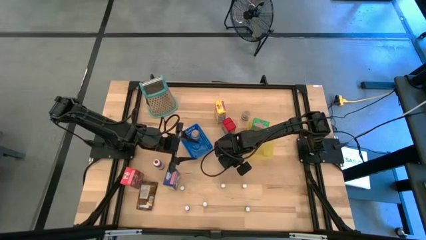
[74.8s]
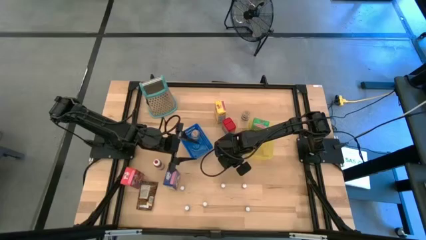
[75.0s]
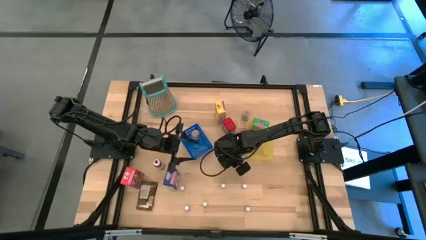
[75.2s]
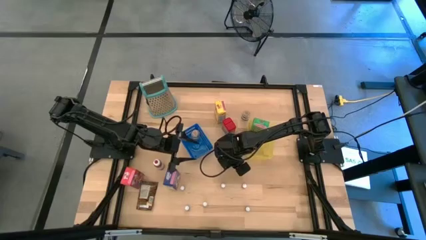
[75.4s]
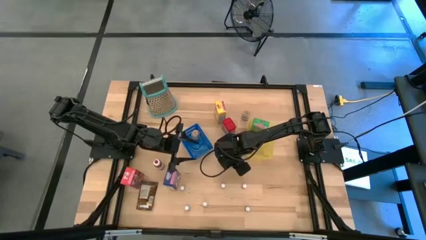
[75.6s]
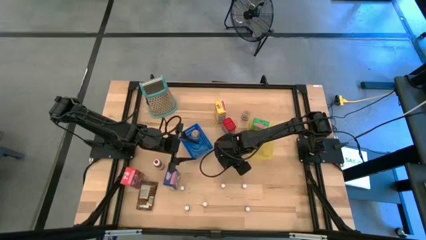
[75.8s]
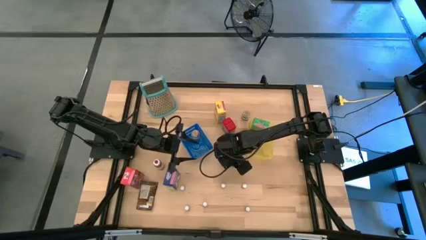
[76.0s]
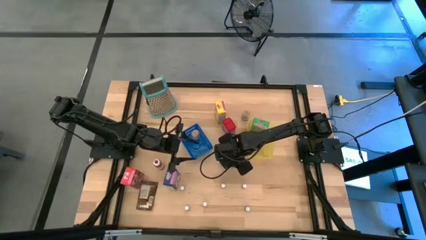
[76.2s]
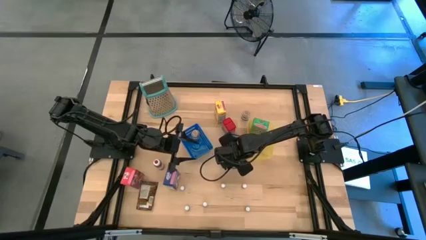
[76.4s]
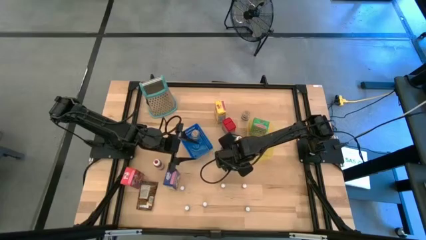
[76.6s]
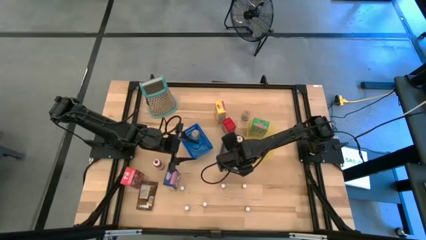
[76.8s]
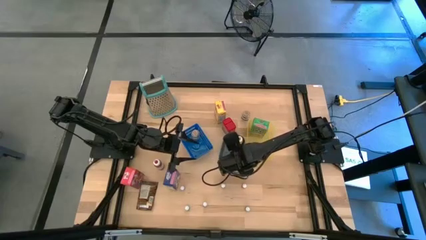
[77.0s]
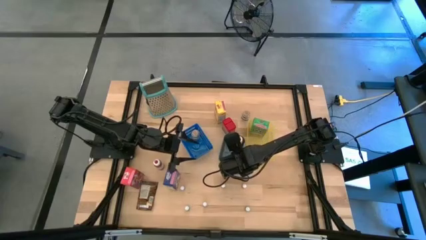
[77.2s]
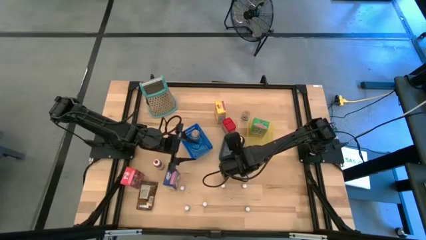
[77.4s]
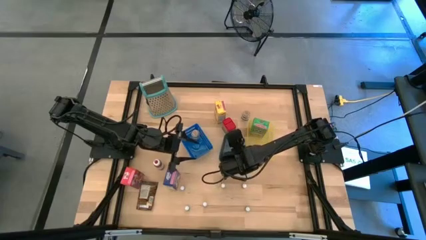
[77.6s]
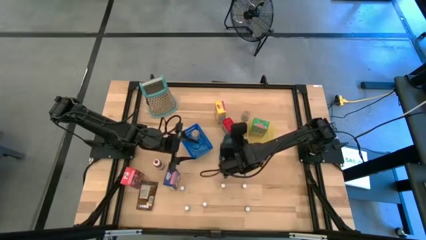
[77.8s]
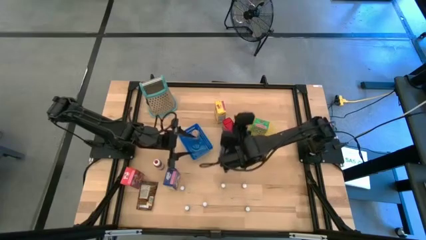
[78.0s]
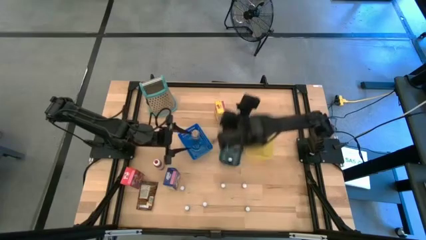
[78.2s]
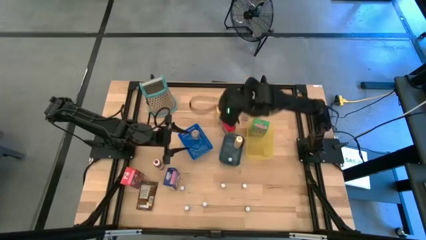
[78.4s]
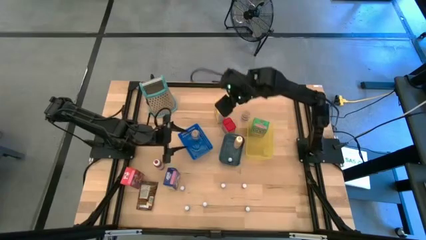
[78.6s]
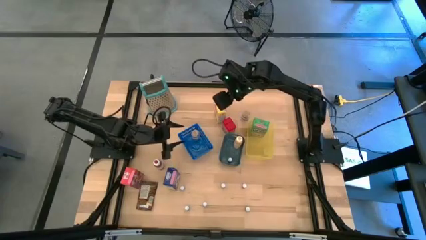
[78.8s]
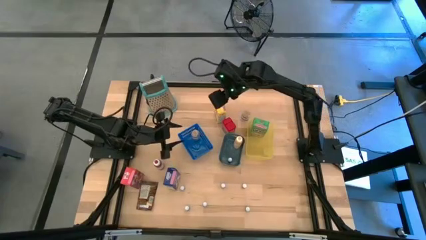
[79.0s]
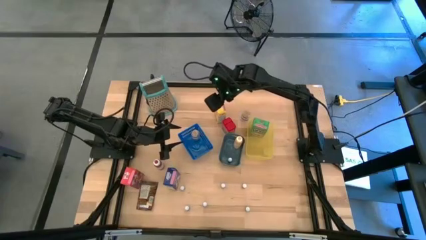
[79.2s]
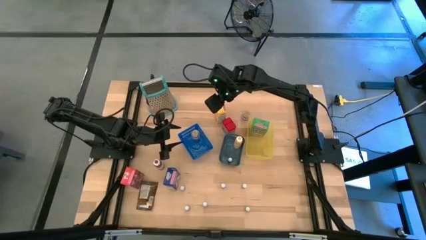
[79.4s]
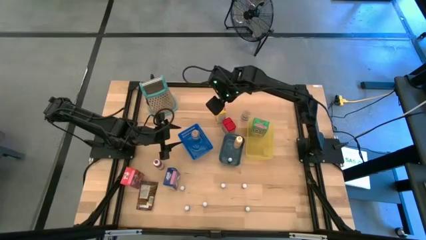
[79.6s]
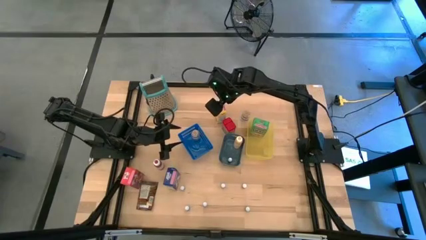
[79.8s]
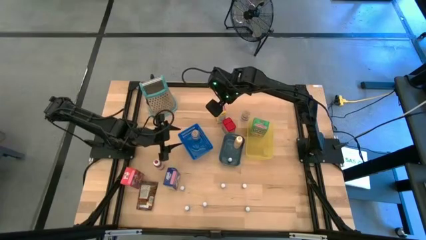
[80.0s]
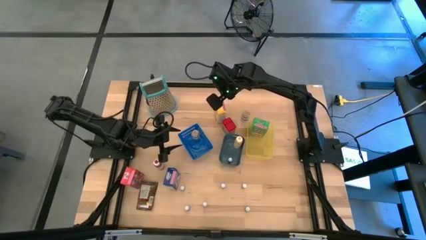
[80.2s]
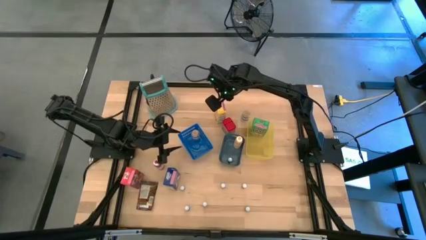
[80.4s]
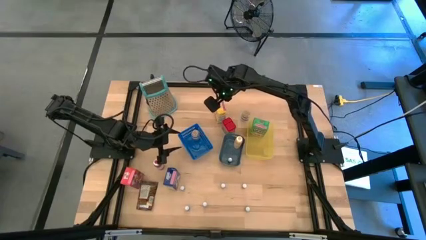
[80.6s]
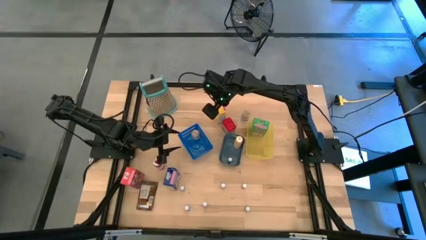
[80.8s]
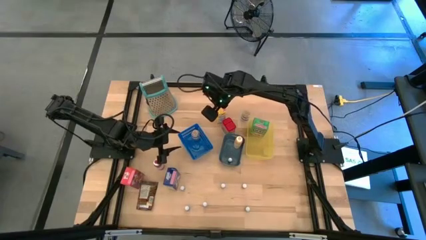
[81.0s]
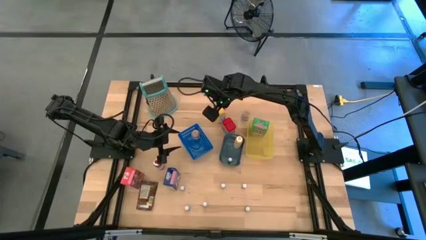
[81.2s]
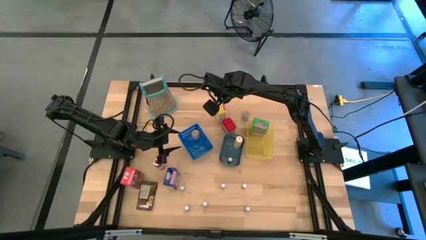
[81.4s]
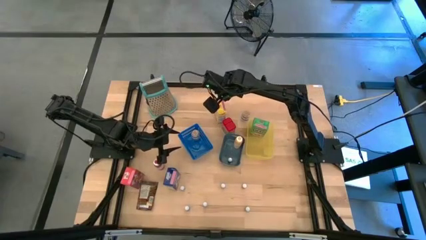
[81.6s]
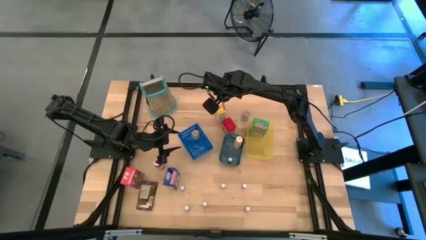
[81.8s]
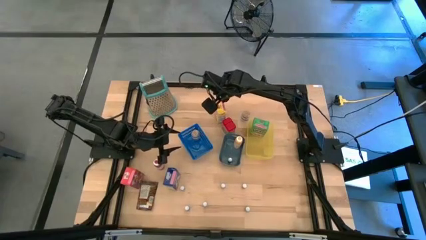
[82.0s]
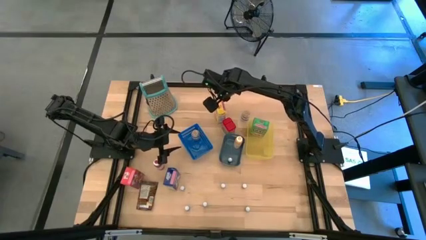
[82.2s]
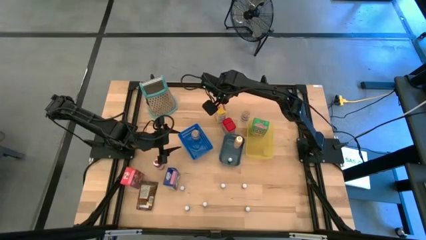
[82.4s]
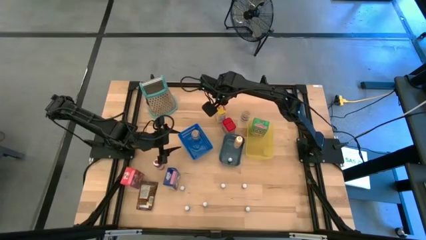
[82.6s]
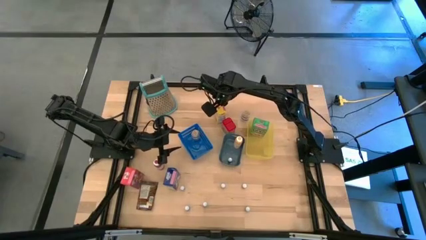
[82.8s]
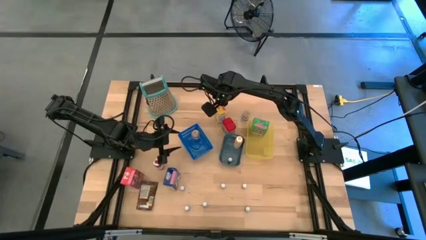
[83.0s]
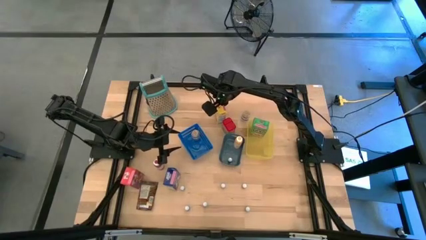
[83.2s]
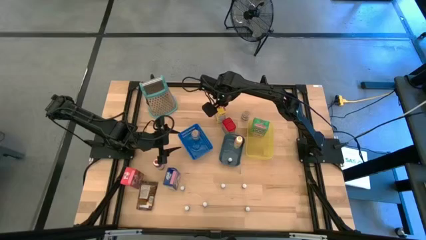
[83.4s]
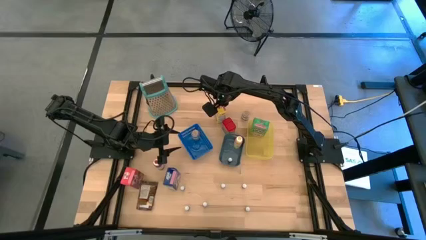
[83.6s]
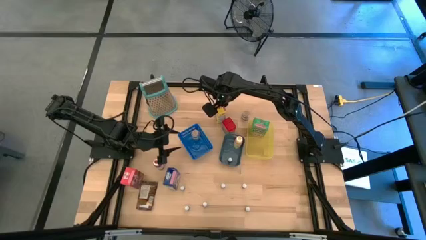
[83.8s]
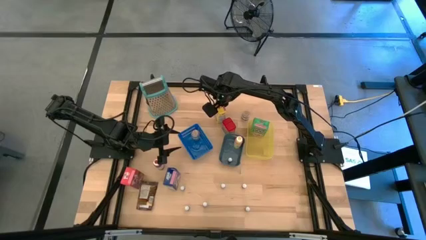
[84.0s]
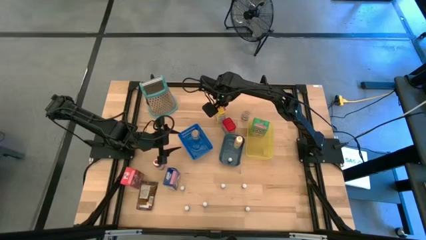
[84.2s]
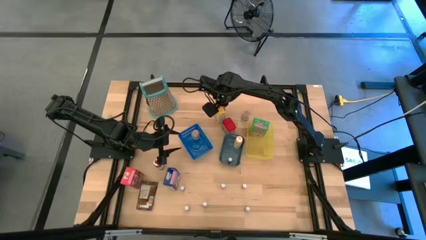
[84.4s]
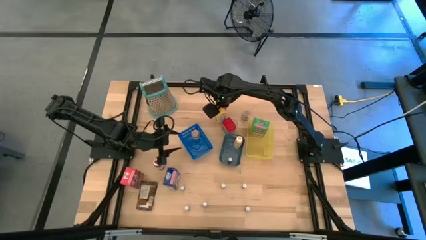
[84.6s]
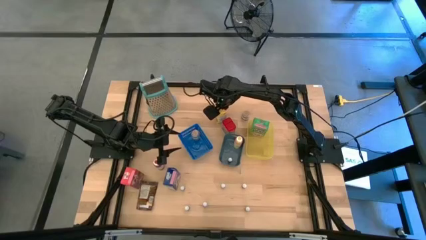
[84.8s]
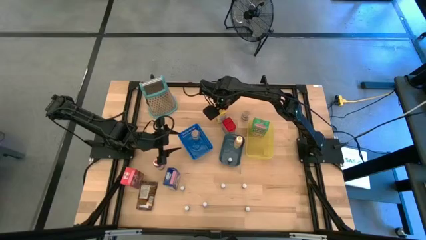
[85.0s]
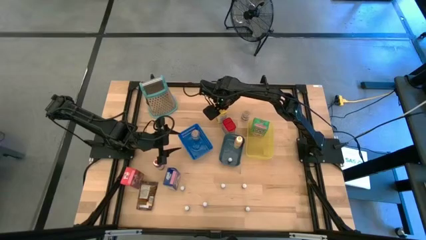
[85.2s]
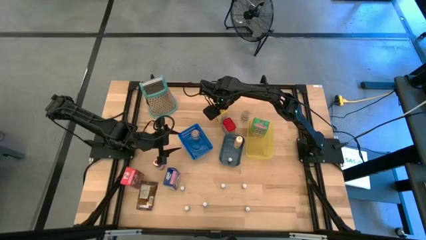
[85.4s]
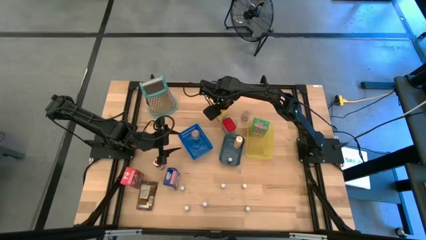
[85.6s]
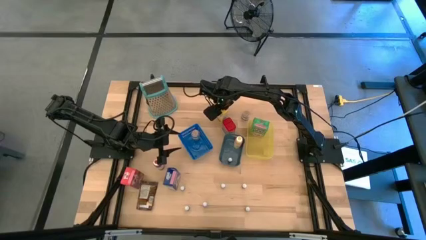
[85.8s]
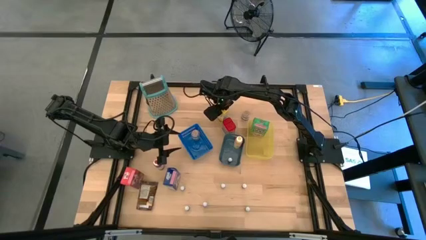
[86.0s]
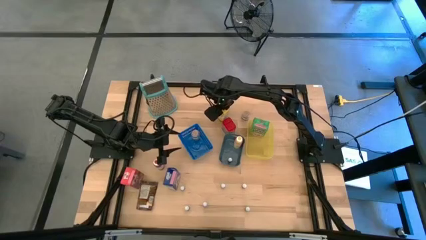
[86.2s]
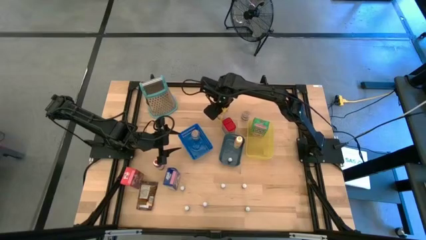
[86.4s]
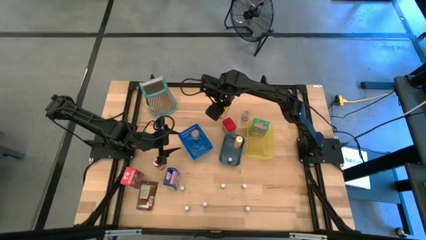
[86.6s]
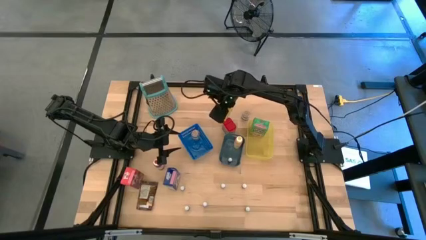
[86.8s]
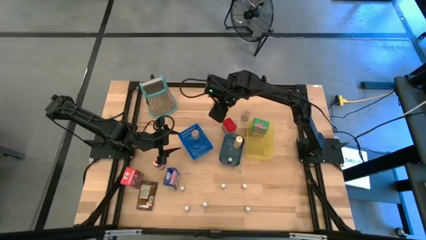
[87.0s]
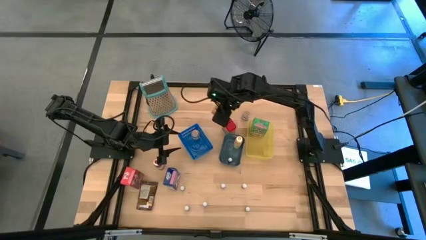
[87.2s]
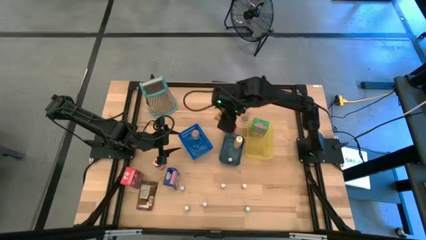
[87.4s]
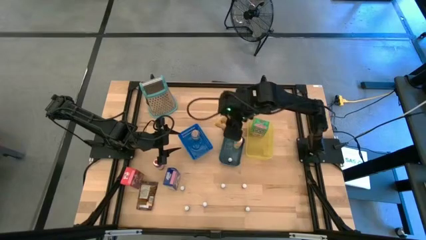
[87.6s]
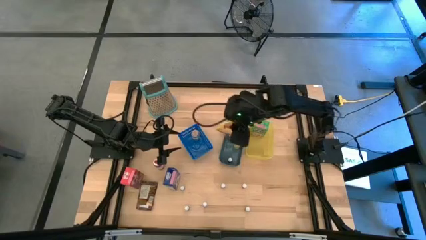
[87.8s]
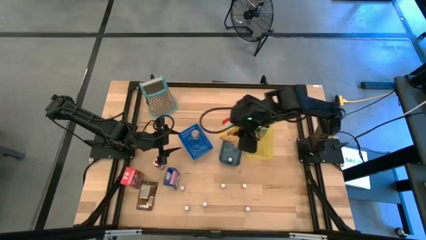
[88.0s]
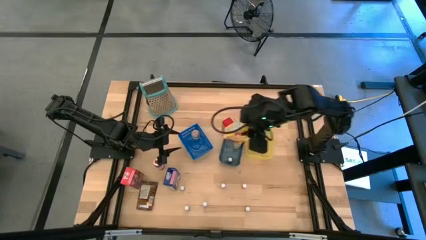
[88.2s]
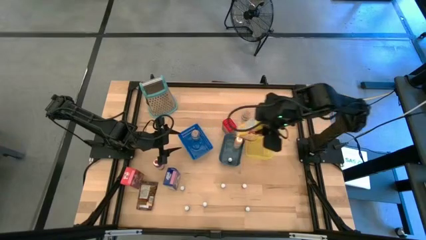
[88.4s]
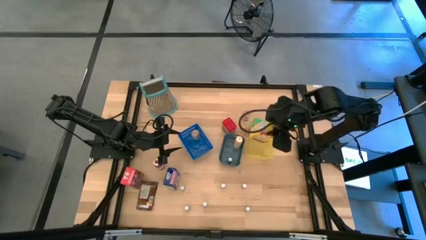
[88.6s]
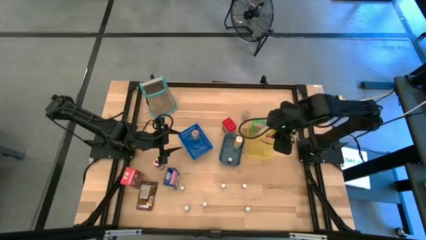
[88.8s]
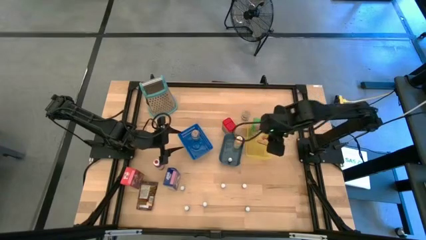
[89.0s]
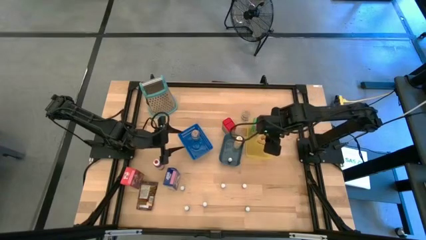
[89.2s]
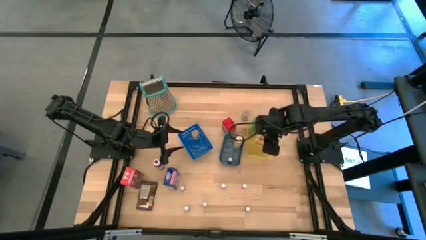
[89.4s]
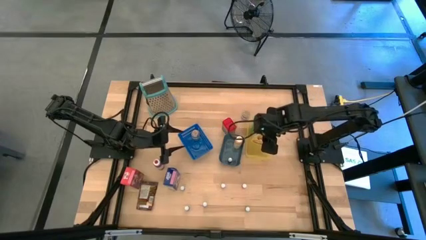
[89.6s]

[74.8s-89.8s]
Task: Pick & Place Kitchen Items
Put the yellow cereal box into the yellow bin
